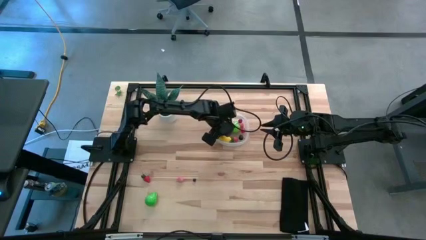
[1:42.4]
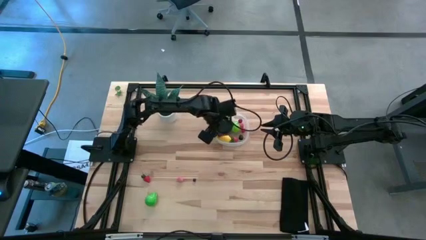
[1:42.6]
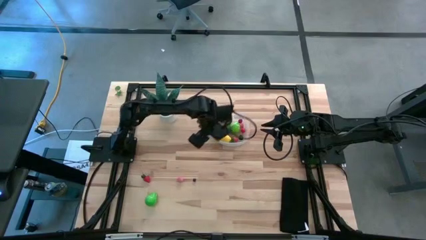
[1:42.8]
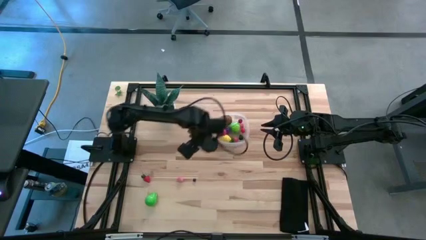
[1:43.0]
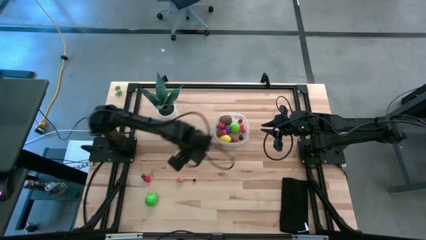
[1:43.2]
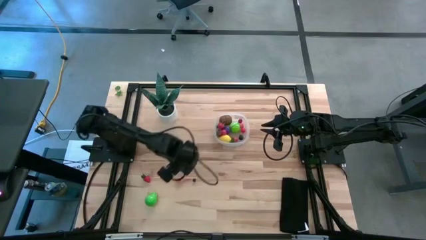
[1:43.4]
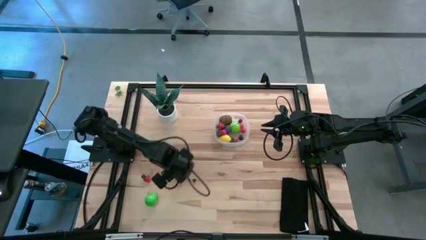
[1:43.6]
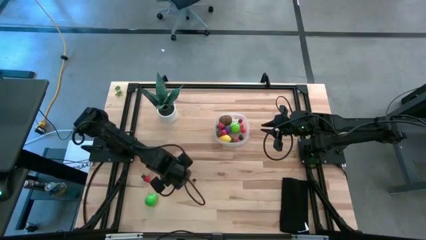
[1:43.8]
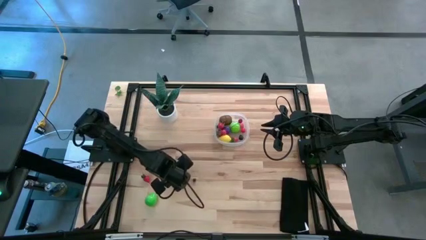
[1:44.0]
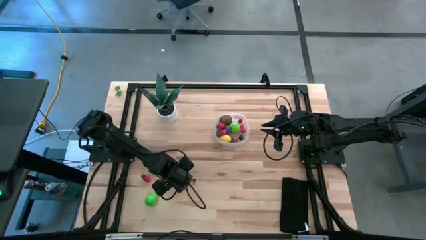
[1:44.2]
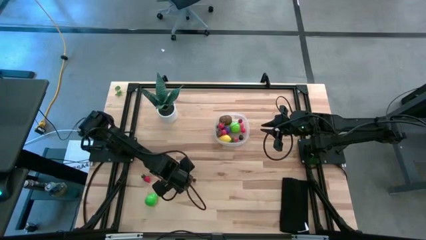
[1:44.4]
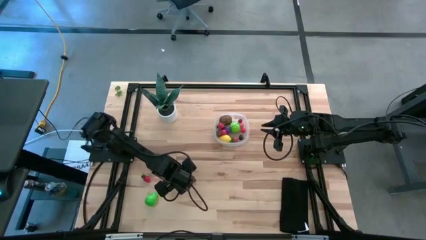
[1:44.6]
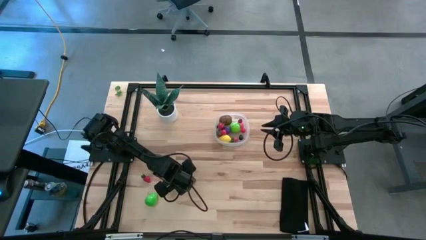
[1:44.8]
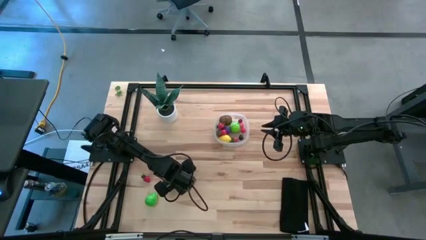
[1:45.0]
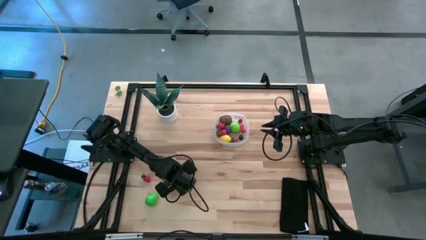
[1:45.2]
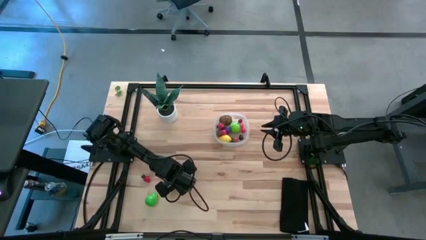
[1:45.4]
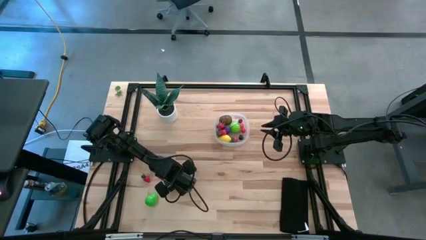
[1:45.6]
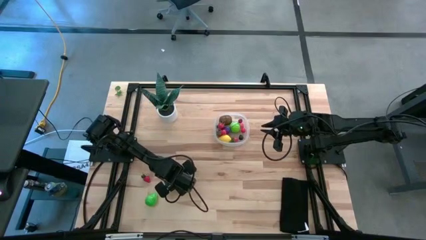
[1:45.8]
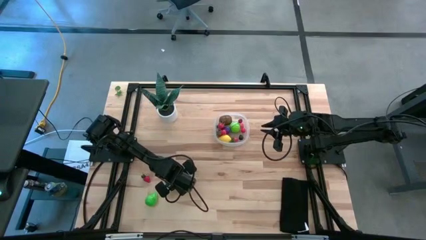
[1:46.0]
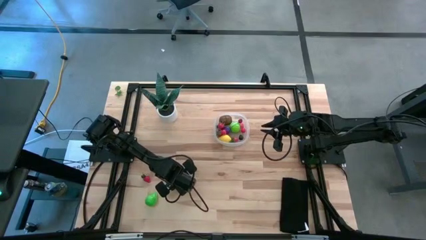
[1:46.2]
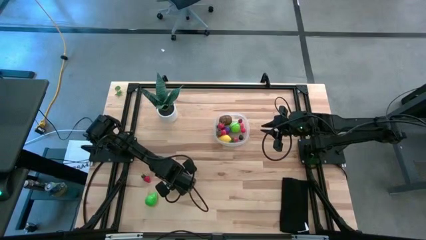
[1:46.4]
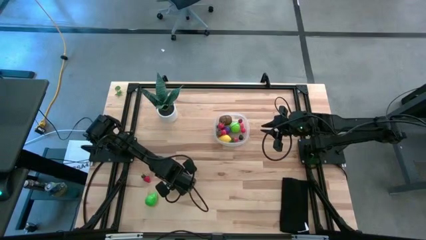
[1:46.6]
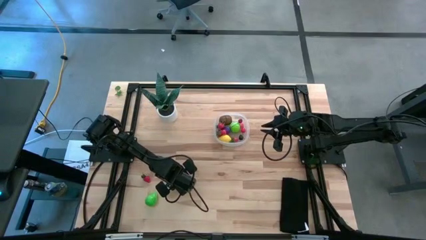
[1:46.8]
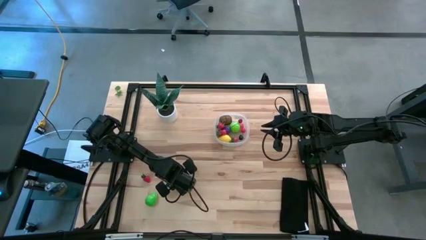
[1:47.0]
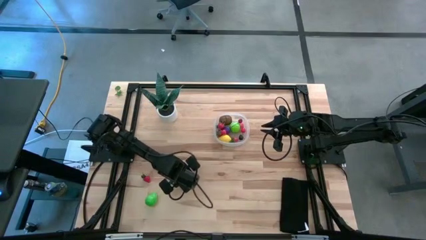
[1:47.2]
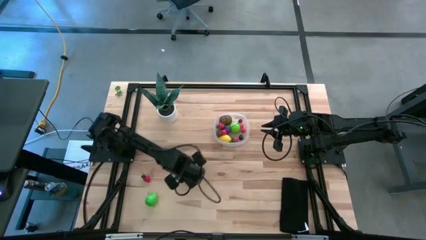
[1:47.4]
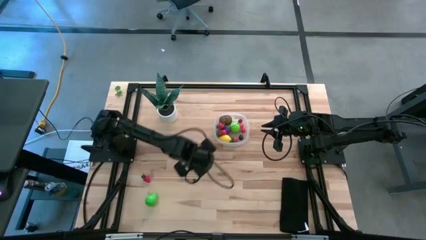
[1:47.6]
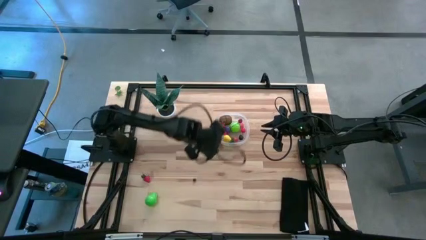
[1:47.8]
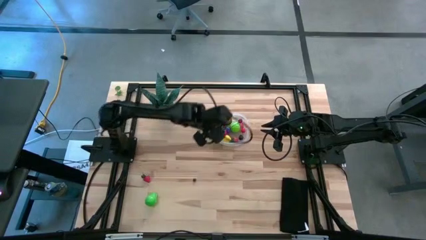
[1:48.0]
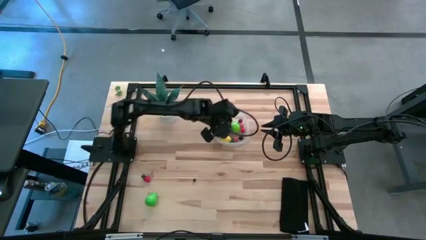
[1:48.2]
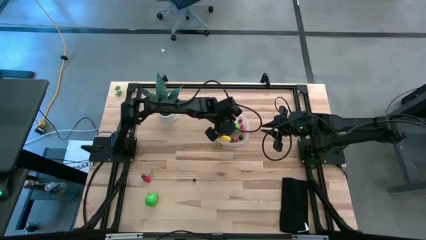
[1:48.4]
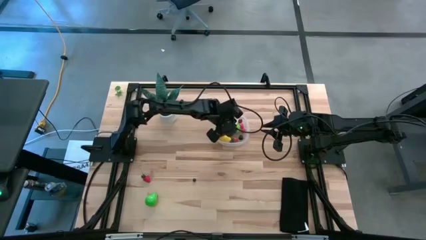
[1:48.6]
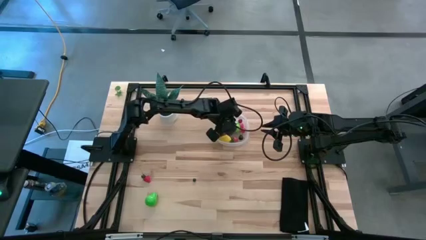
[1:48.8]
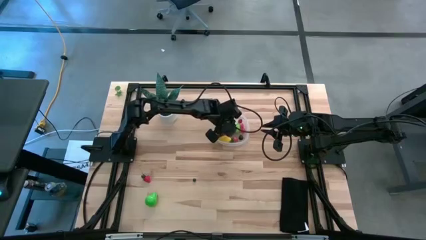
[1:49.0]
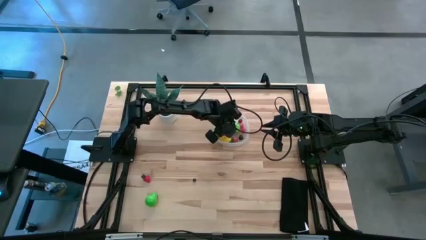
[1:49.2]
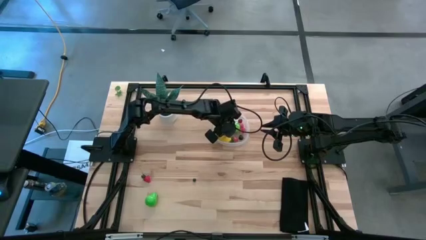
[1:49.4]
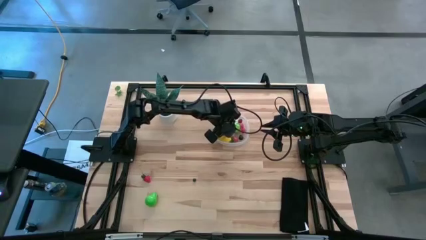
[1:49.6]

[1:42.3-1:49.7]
Task: Pick and placing Produce into tupperware
Put the peach into the transparent bin

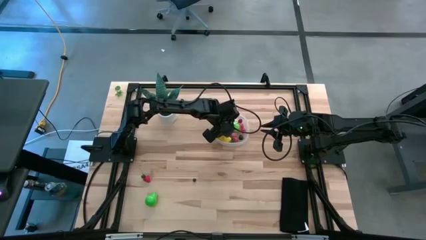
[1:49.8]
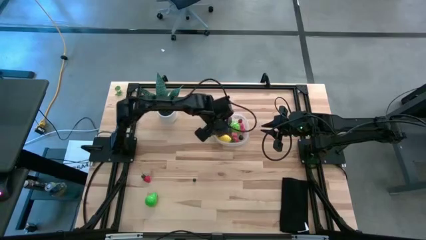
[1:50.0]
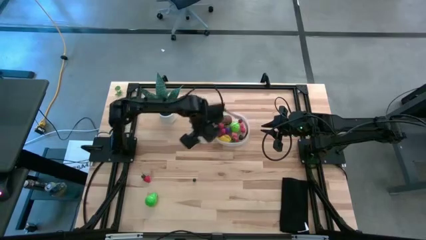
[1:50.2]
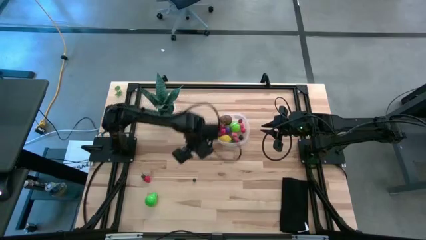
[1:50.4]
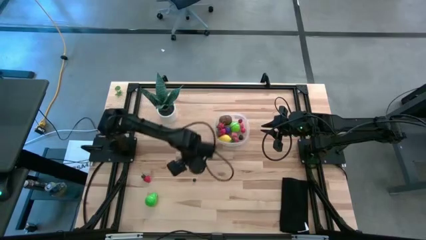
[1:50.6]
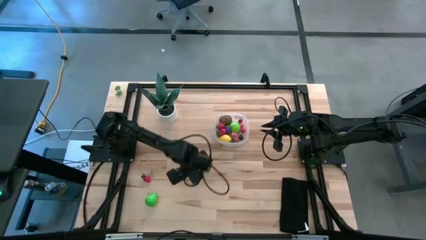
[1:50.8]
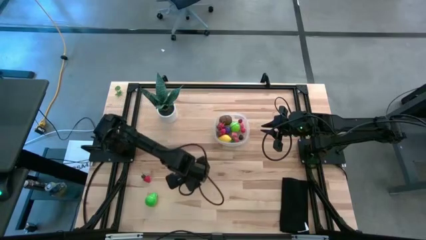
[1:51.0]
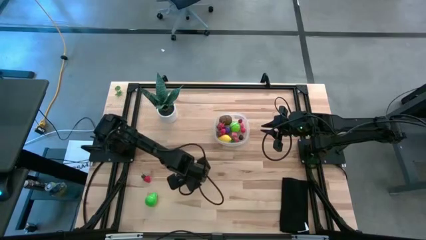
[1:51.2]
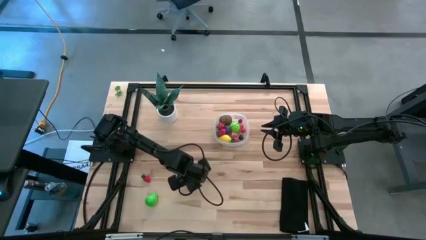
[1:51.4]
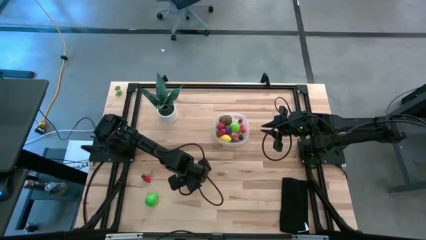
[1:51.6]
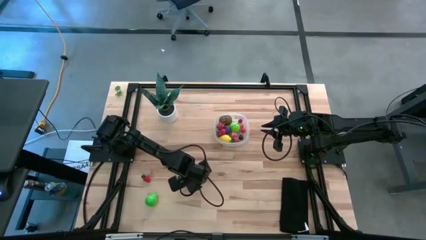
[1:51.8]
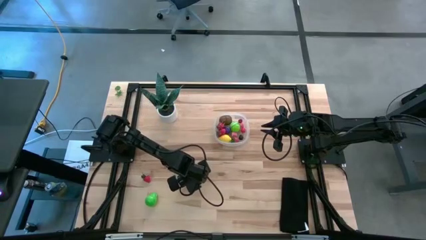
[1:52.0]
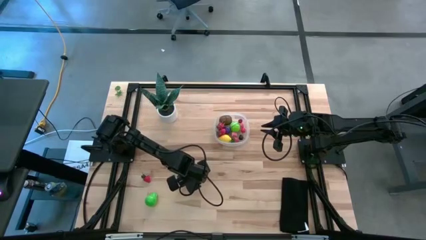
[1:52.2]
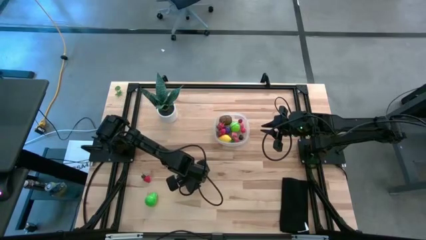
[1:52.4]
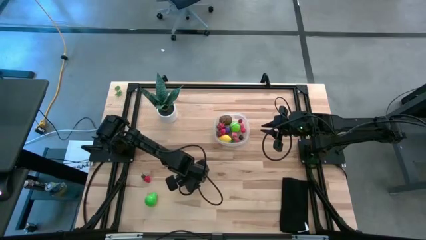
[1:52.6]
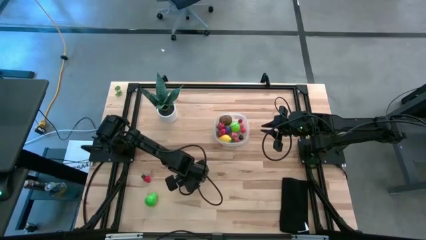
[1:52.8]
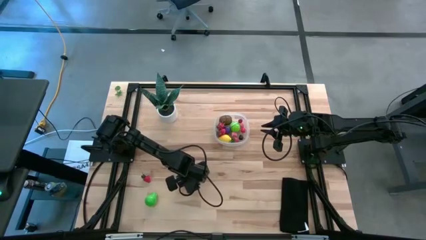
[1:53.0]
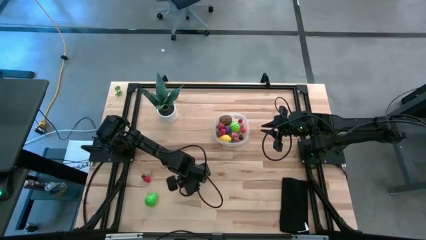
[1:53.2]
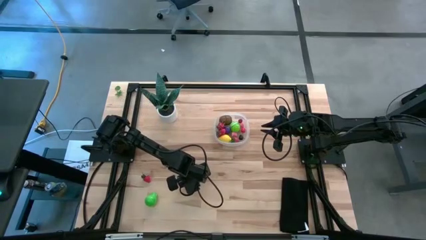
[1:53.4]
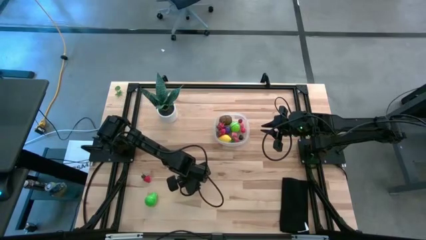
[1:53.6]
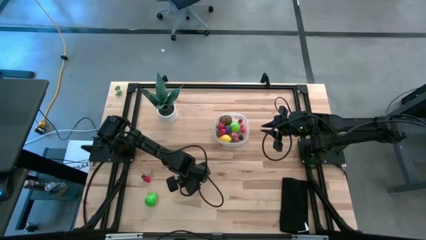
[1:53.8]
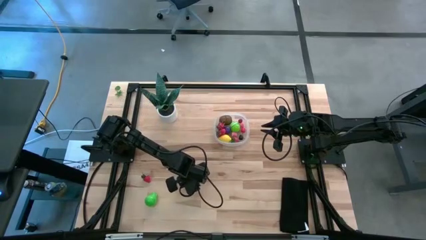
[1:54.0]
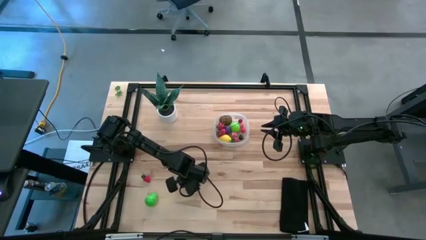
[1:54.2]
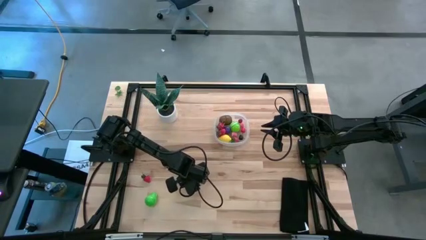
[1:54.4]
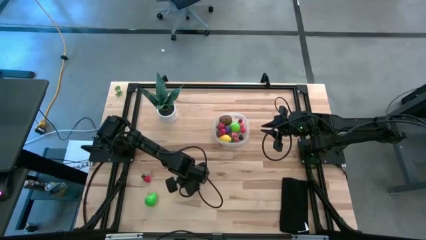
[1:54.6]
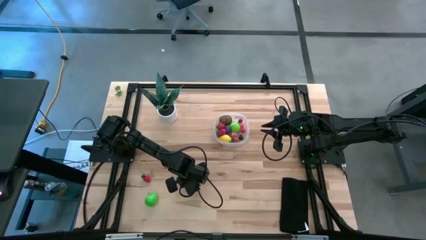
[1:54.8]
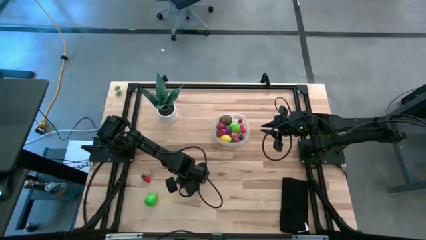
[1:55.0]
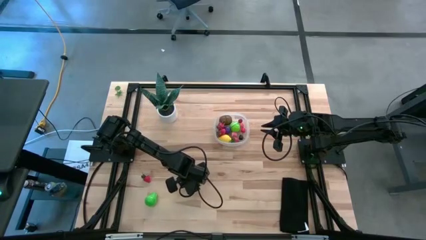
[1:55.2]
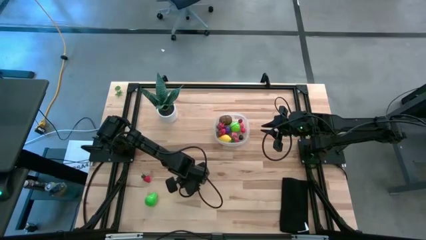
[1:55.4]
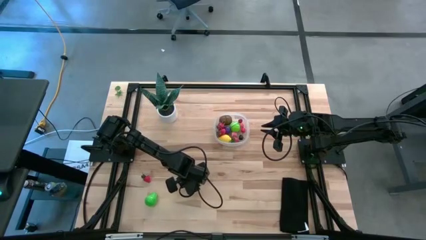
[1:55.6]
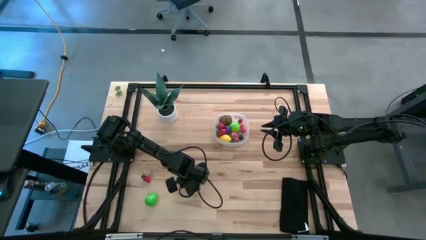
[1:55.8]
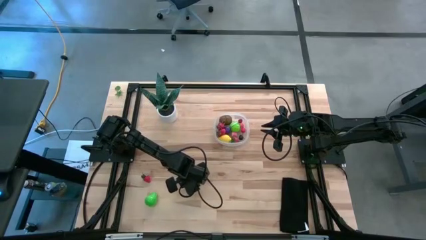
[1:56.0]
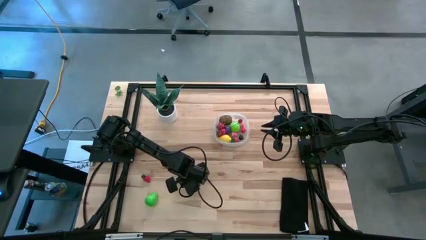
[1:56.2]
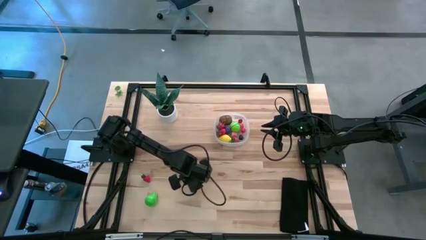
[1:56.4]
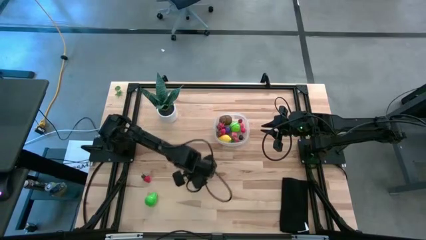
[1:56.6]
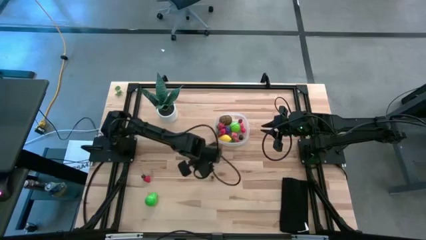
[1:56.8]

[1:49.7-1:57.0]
Put the blueberry into the transparent bin

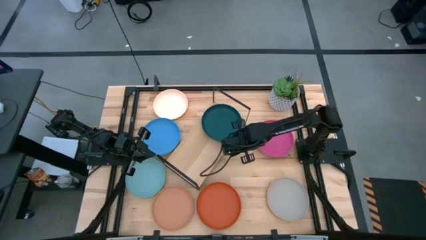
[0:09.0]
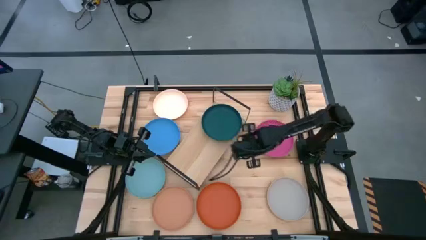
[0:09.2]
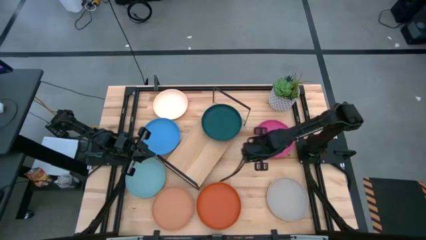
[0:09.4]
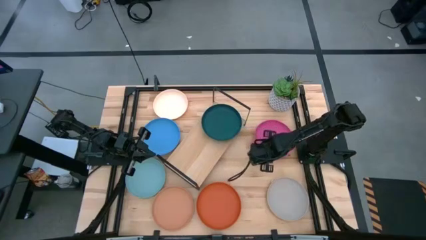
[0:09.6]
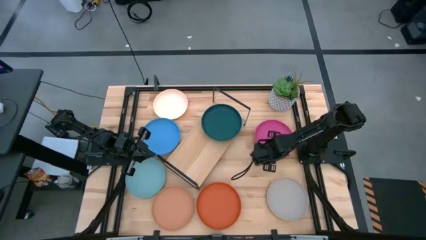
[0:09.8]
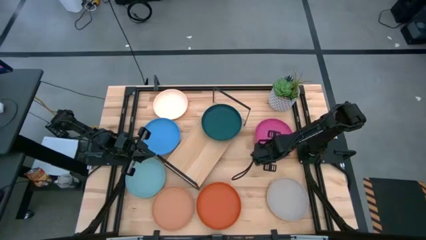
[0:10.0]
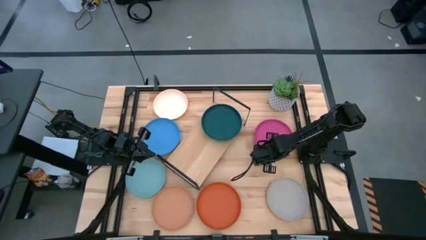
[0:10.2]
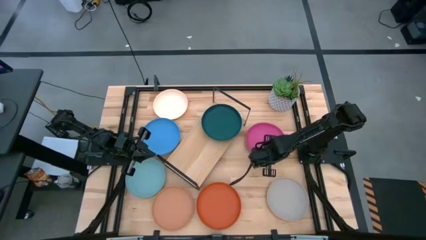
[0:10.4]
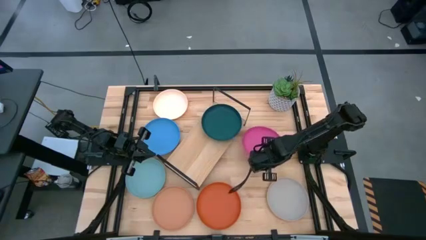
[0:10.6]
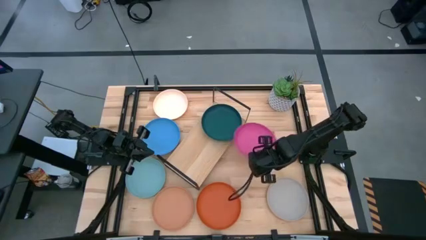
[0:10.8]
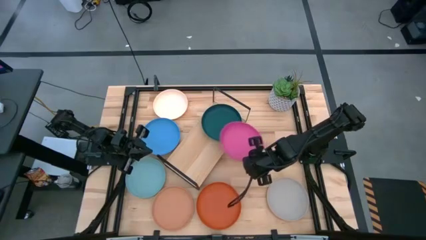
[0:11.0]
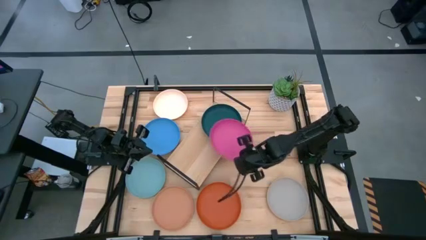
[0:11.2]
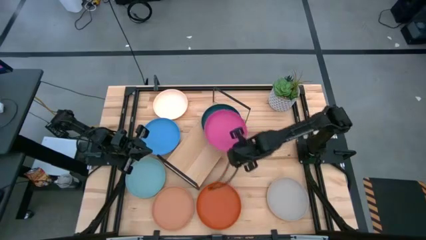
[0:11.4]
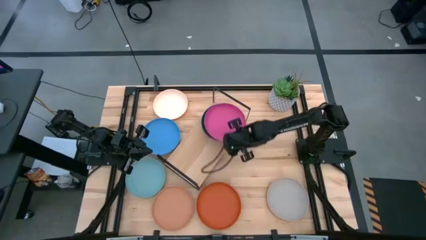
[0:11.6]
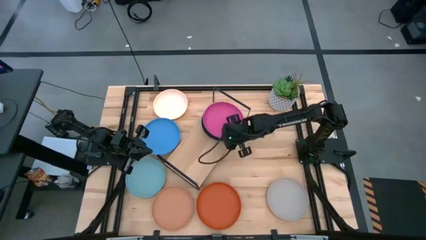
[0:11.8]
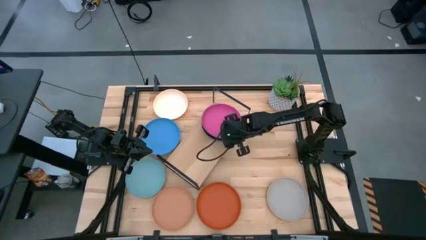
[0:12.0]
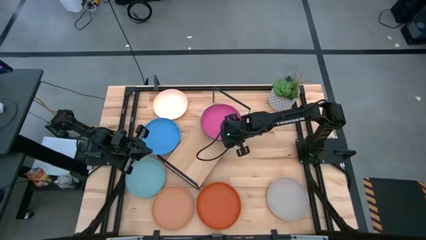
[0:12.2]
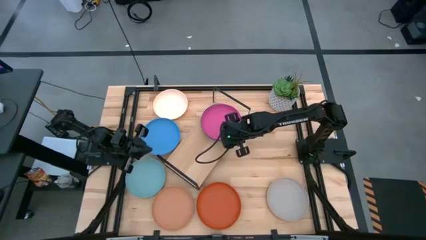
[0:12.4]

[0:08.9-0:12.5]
Task: Place and stack plates onto a shelf
Stack the pink plate on top of the dark blue plate on the shelf
